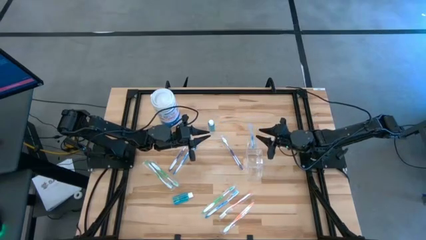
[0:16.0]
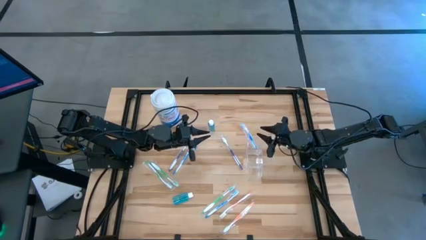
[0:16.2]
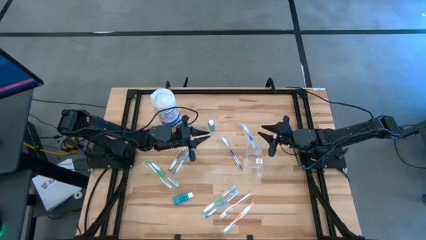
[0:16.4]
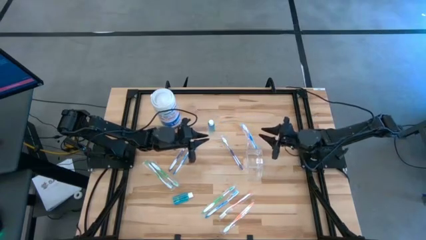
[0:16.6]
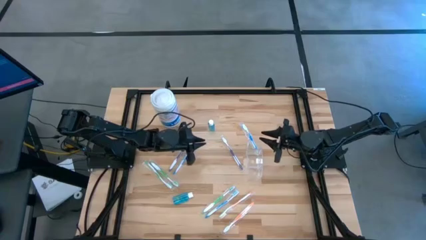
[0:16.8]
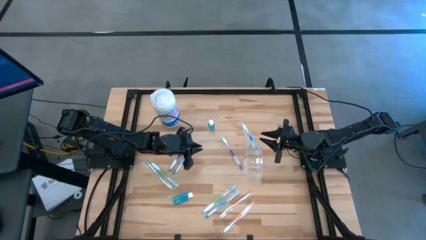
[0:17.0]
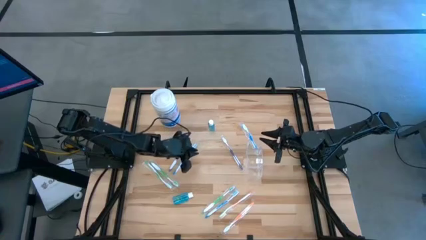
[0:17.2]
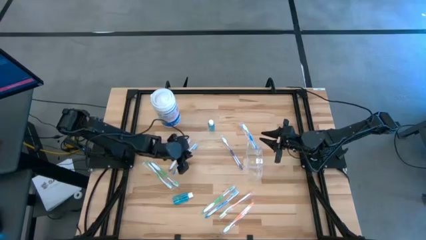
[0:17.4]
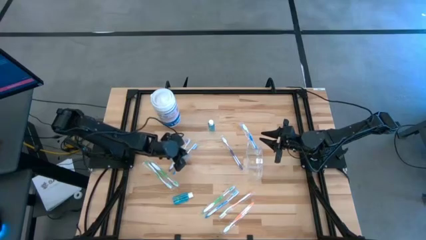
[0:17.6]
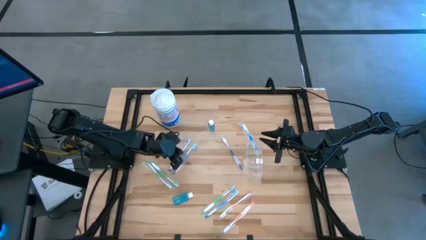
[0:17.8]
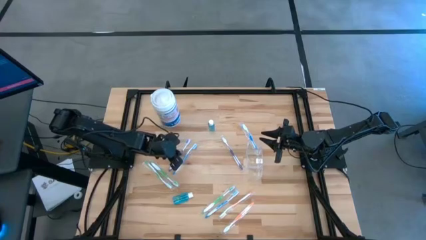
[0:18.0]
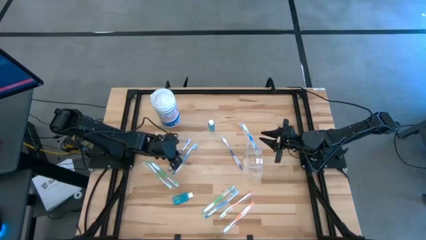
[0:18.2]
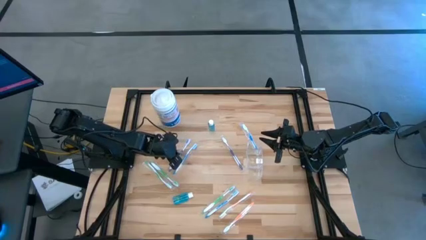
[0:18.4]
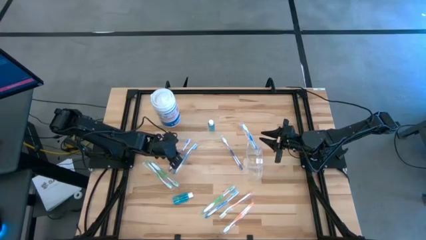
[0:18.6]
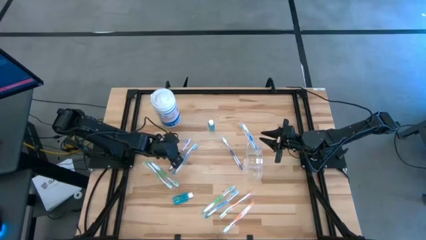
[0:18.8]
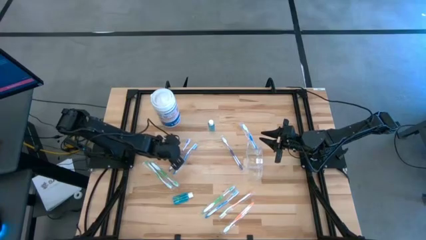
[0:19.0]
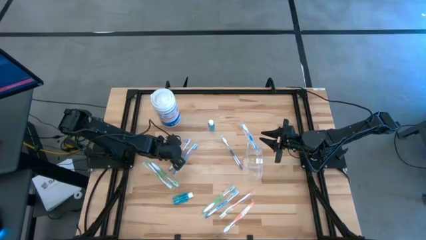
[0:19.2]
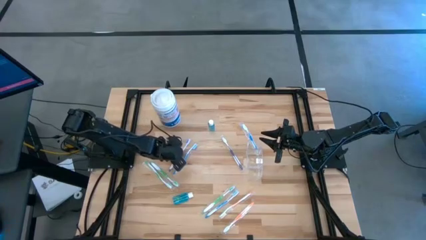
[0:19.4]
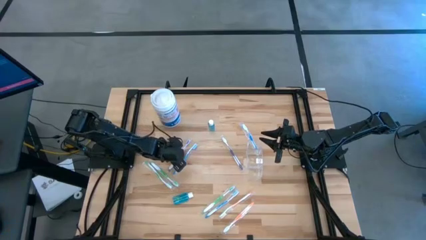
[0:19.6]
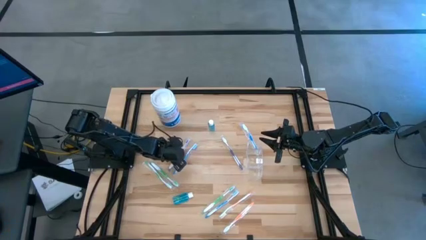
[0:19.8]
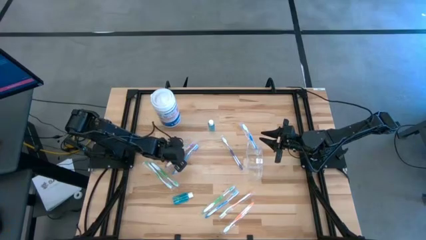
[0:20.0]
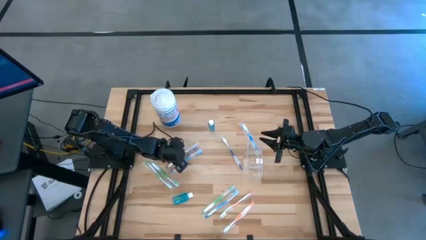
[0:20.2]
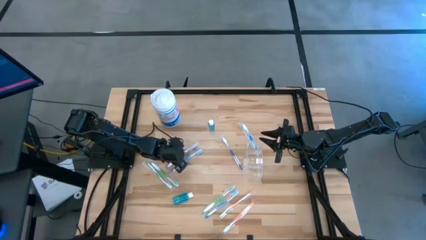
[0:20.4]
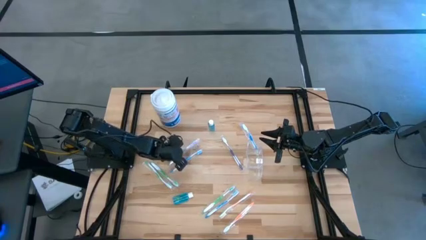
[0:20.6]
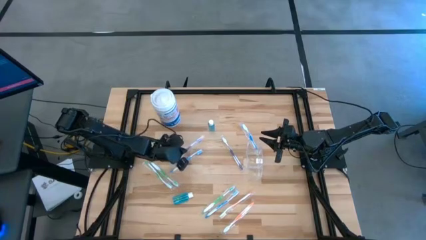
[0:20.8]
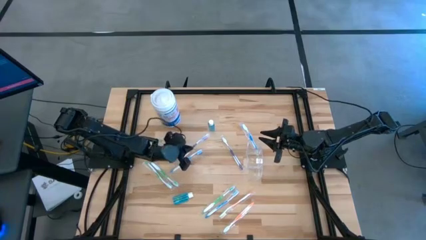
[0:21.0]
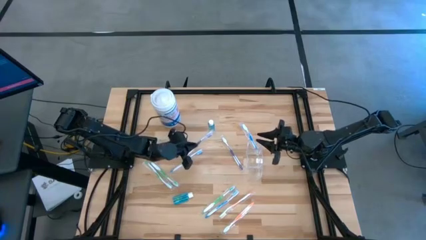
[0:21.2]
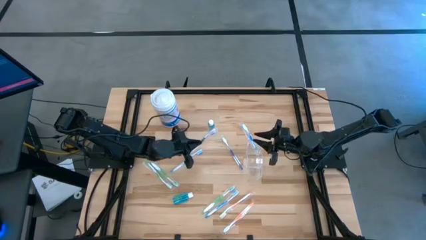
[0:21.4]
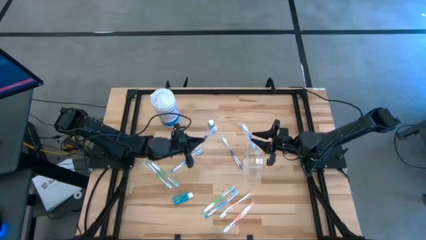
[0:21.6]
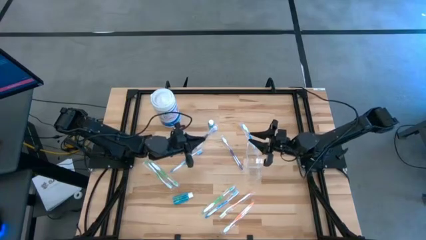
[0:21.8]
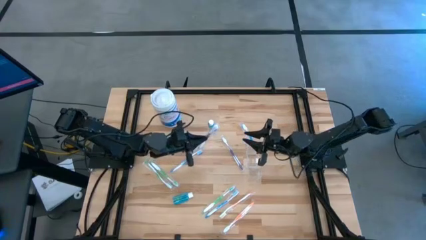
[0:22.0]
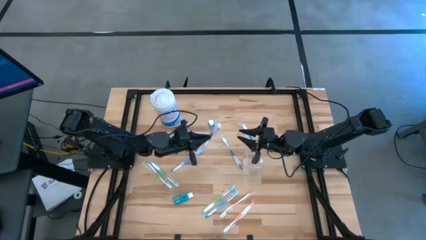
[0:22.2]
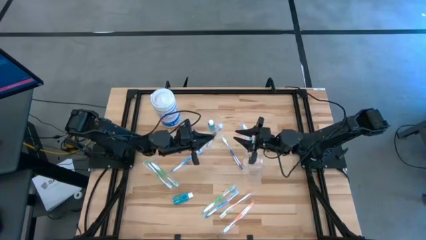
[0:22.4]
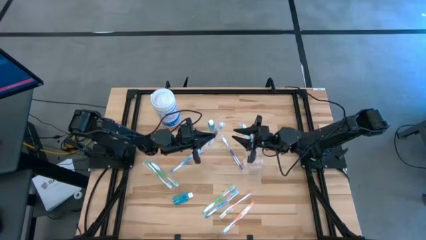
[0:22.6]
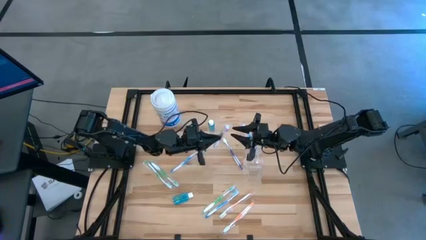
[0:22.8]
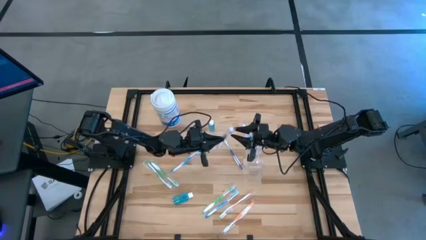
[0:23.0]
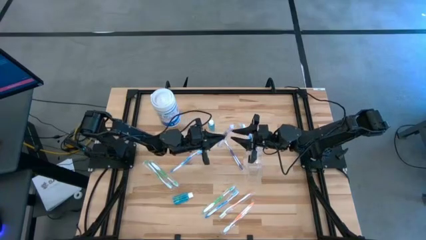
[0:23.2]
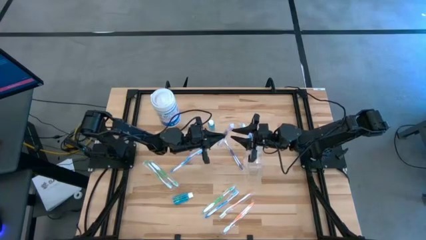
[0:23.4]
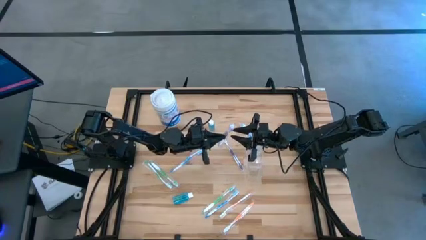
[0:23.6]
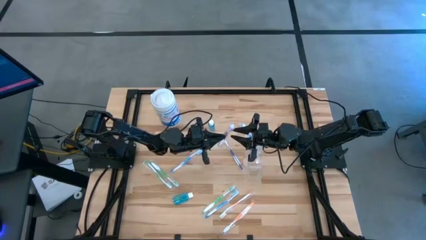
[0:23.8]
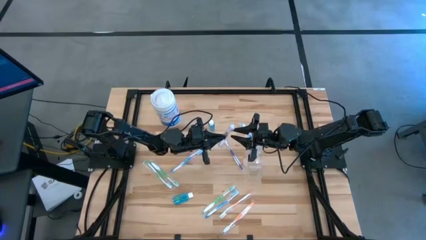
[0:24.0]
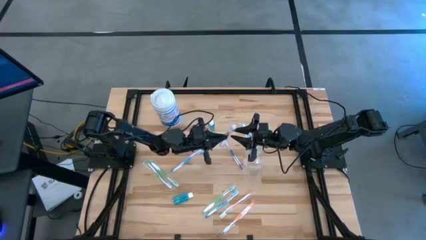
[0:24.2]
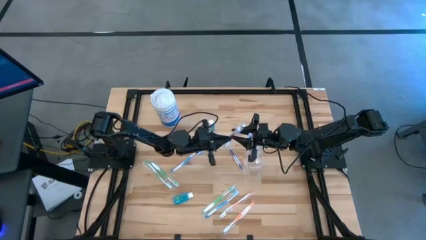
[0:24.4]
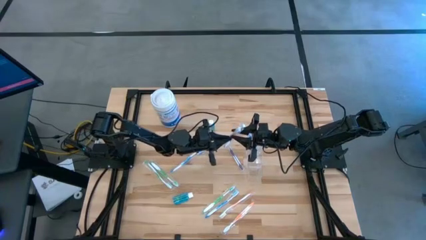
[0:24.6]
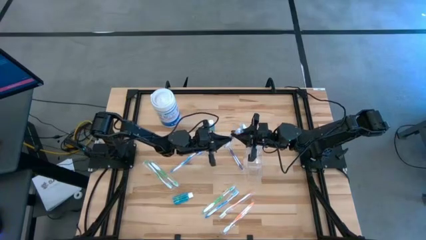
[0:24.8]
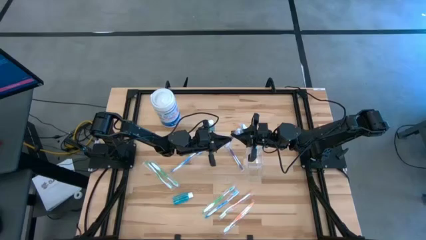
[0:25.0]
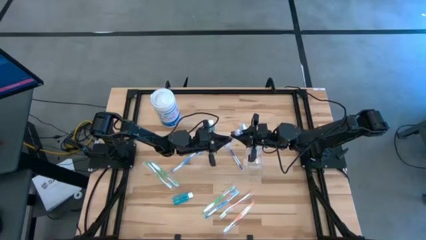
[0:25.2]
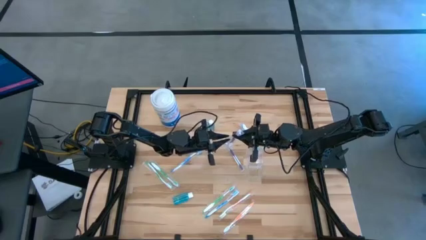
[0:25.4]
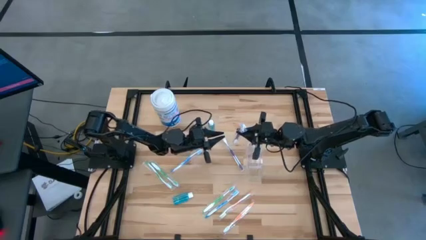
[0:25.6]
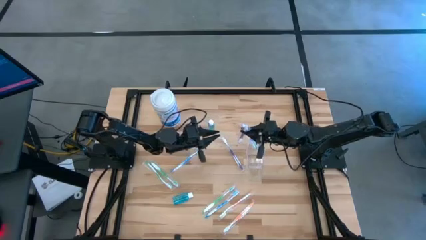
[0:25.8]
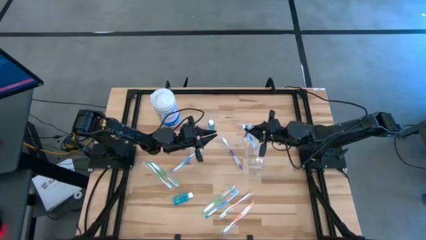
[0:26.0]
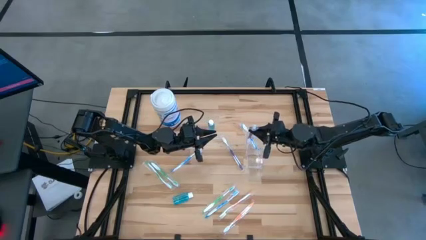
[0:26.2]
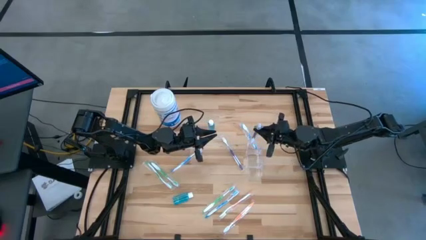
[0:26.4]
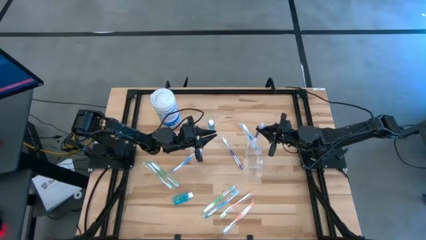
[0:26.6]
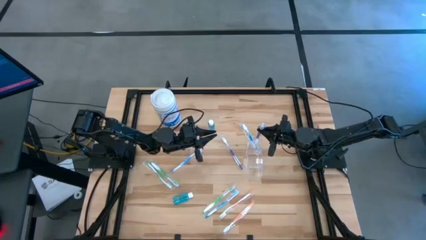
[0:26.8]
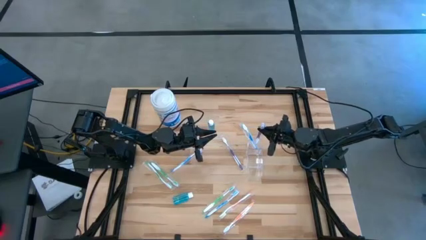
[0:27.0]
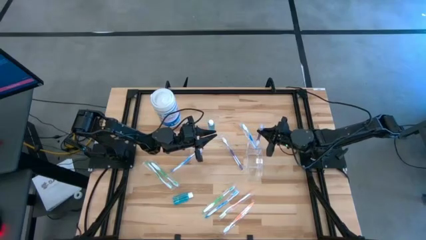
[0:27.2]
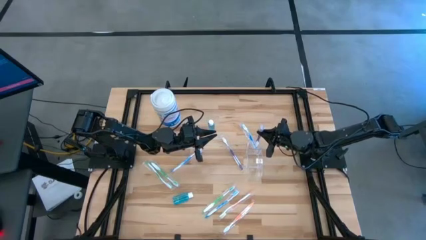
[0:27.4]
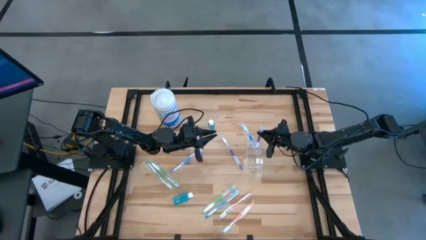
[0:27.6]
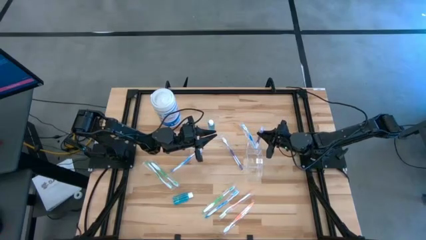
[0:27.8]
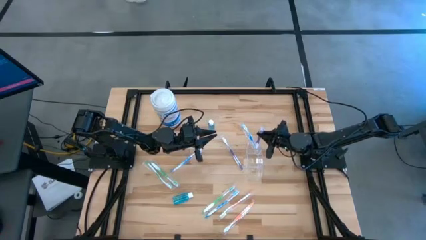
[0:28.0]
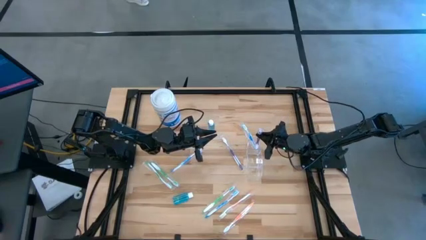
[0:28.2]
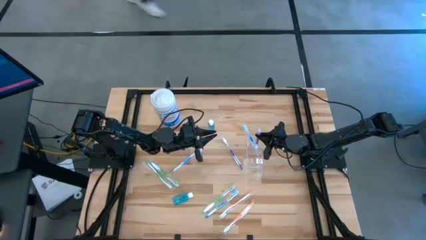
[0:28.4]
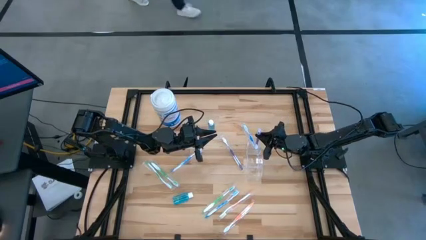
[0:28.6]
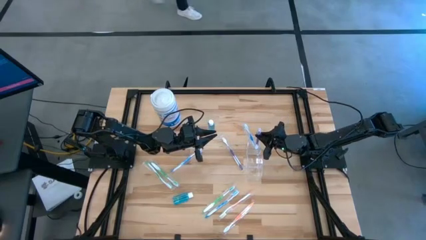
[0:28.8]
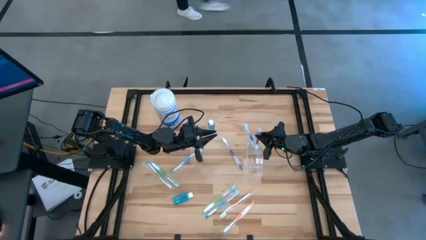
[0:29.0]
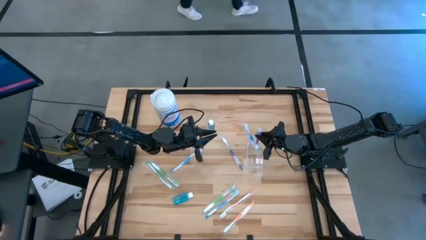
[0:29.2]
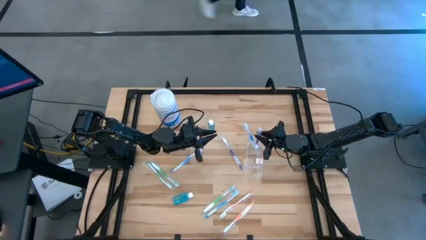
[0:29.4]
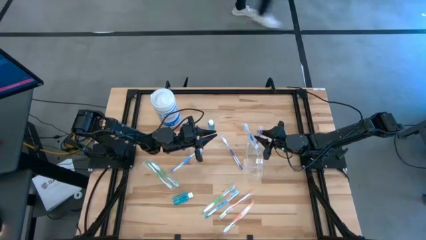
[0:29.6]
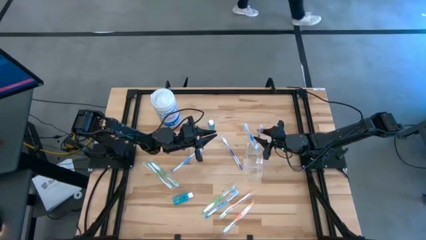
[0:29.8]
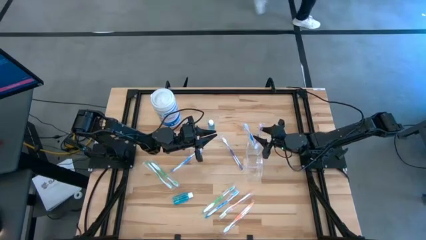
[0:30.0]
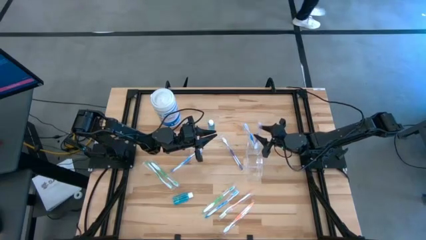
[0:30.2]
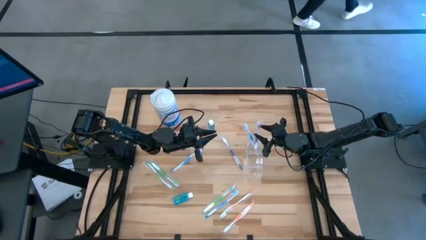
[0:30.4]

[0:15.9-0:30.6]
Task: Pick & Place toothbrushing station
Put the purple toothbrush into the transparent organizer
